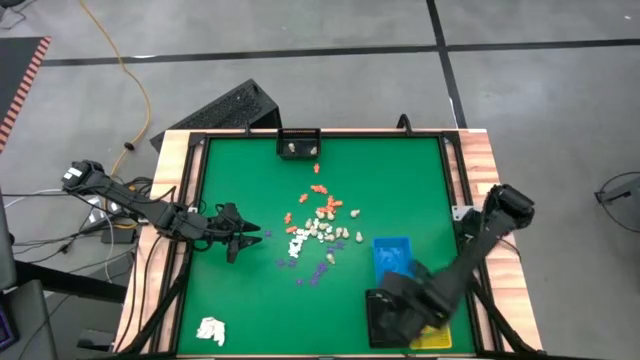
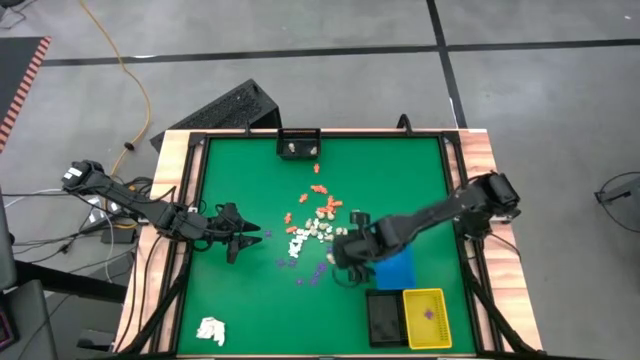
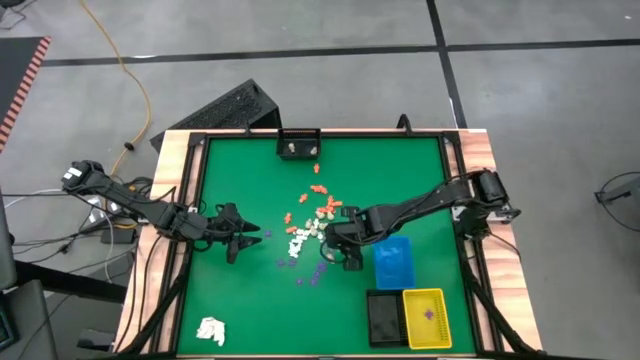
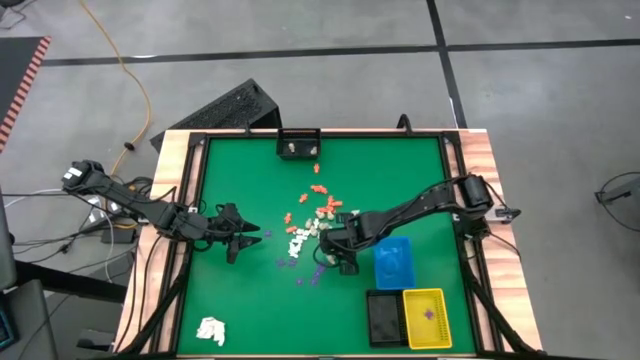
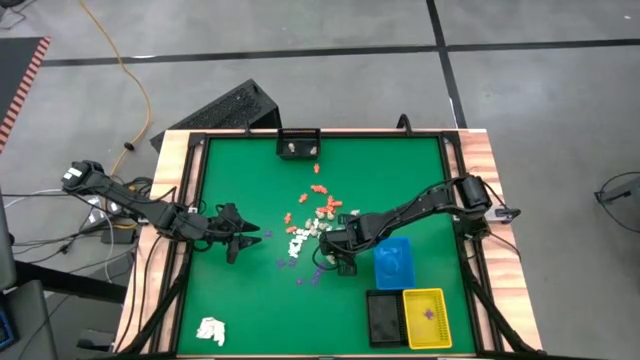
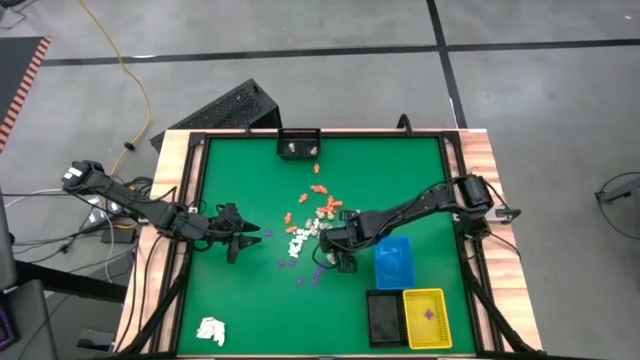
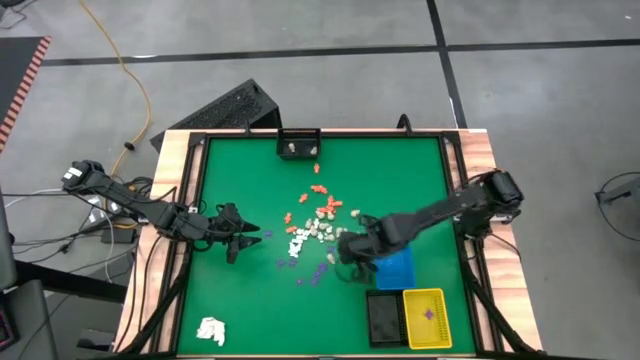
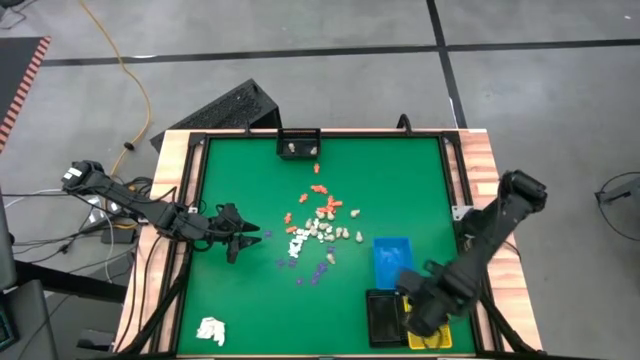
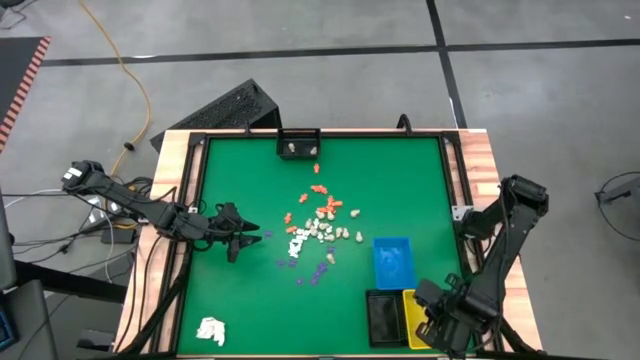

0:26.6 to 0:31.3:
Task: Sort Halloween decoration
Put the purple spider toy into the yellow bin

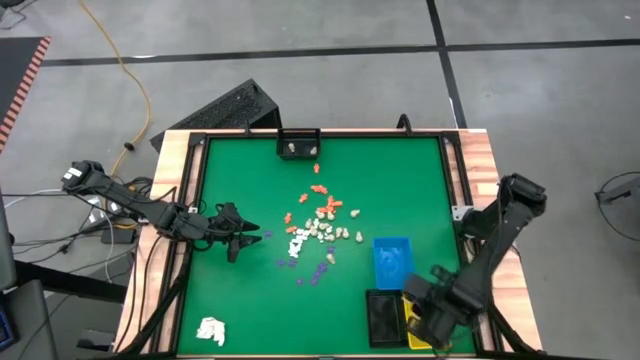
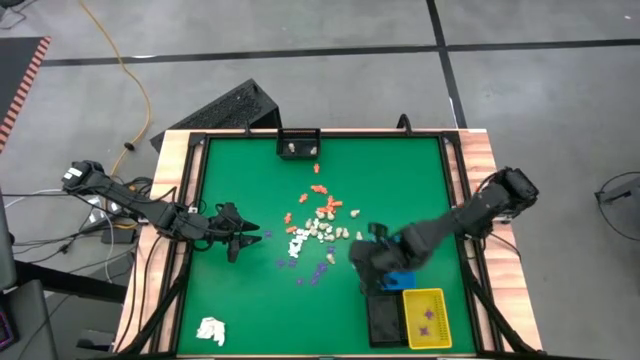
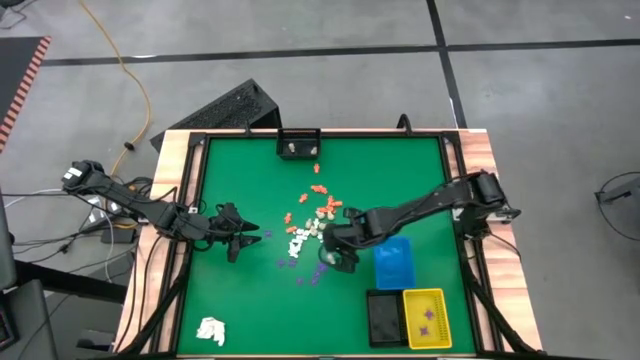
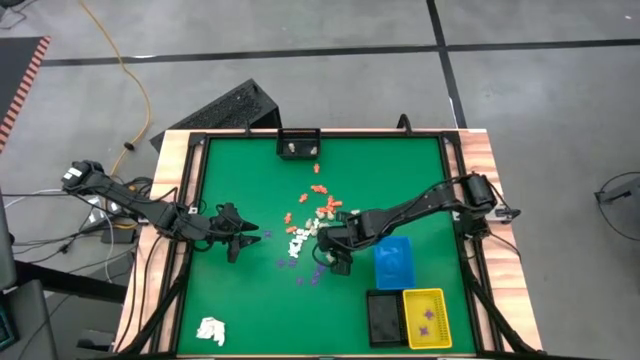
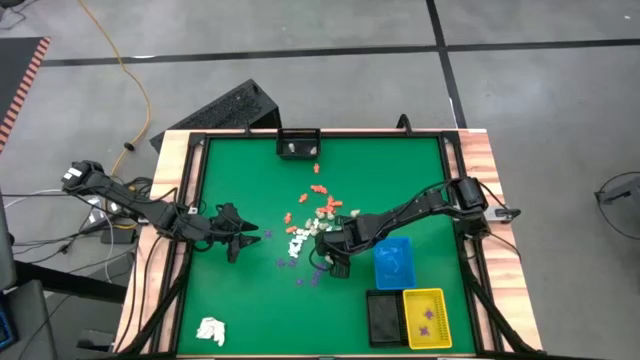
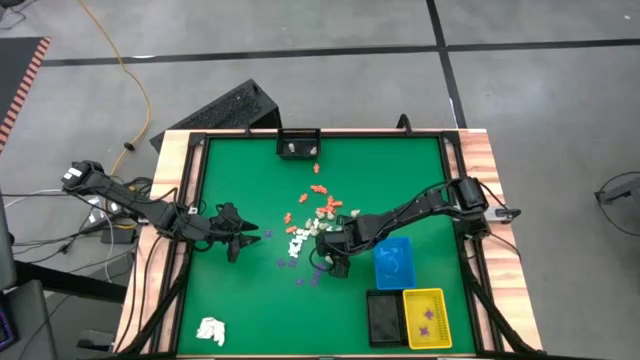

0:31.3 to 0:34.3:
Put the purple spider toy into the yellow bin

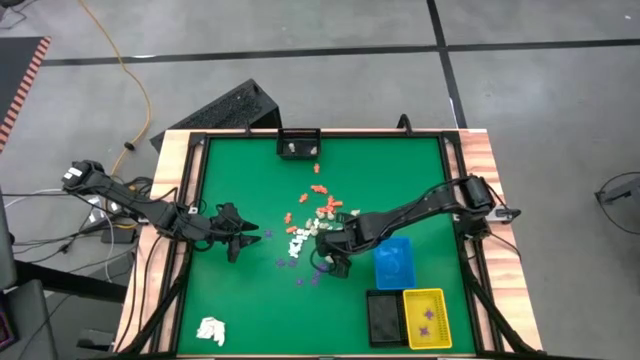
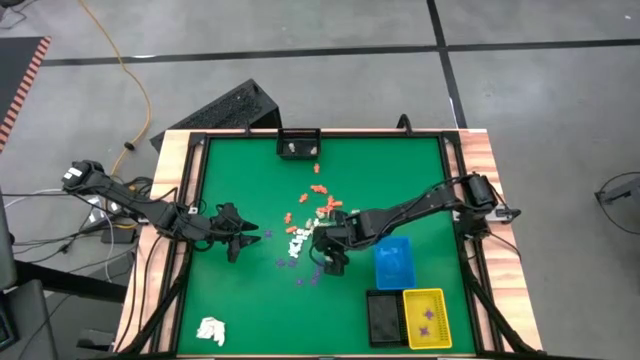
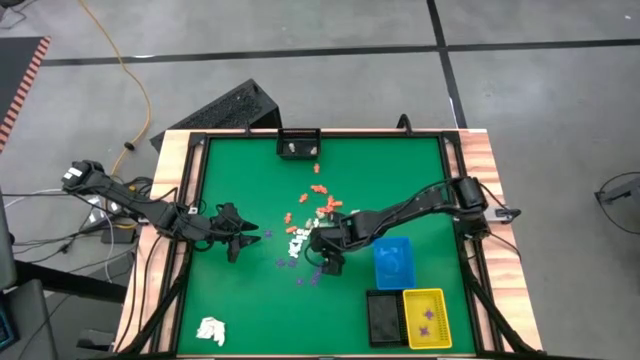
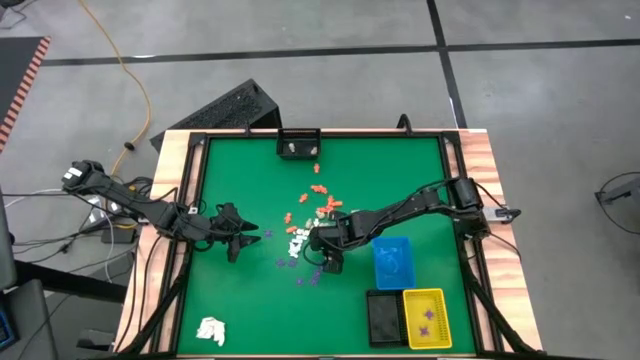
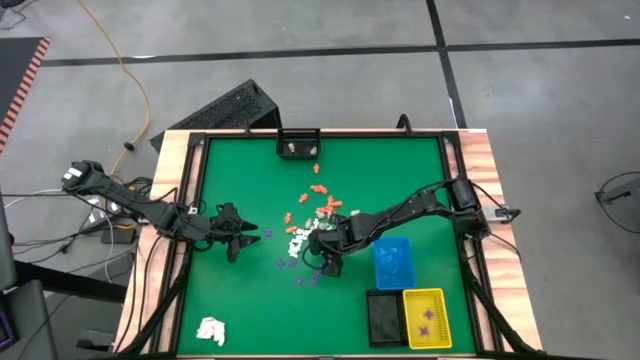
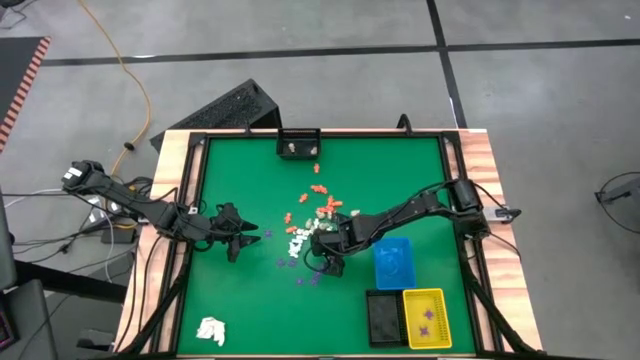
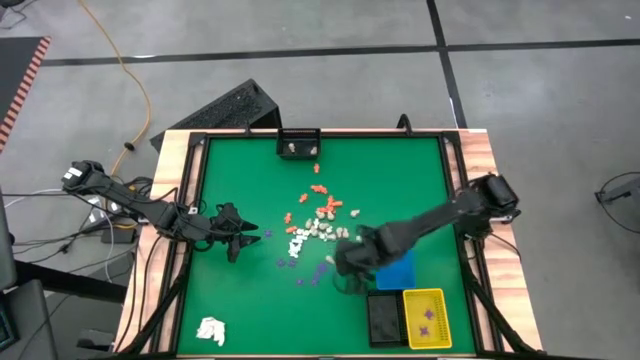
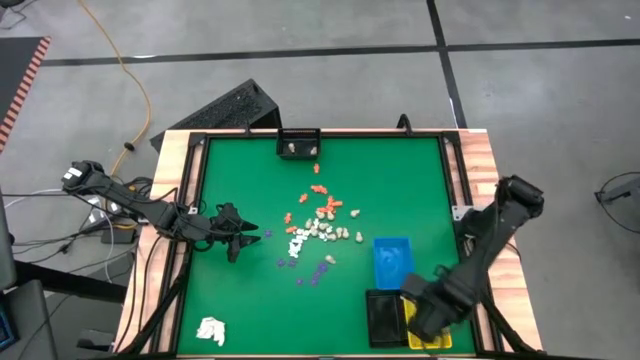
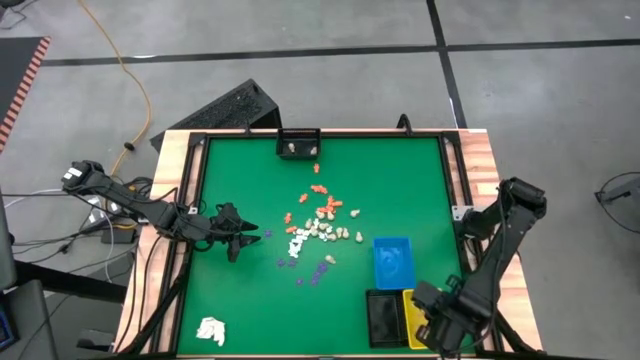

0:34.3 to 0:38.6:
Put the purple spider toy into the yellow bin

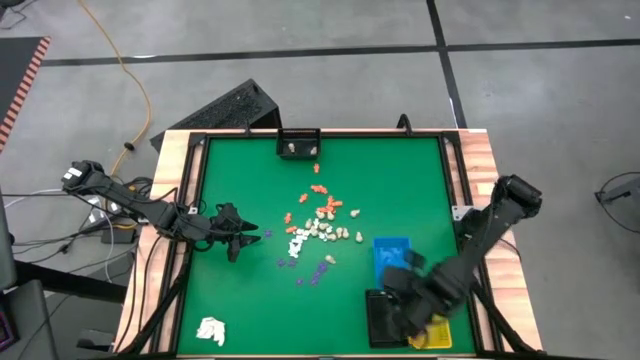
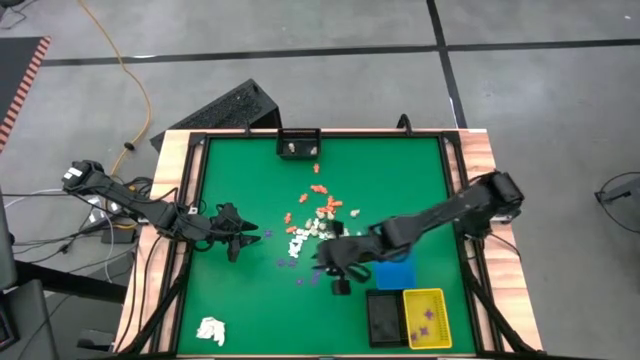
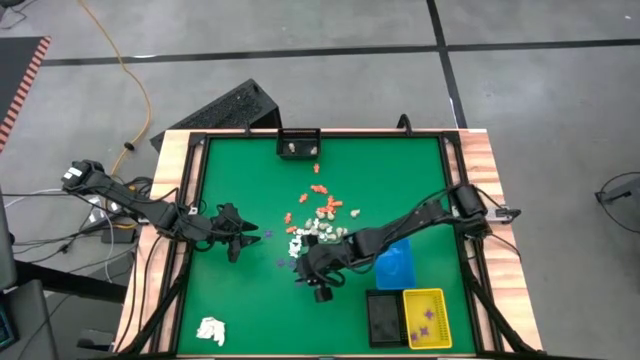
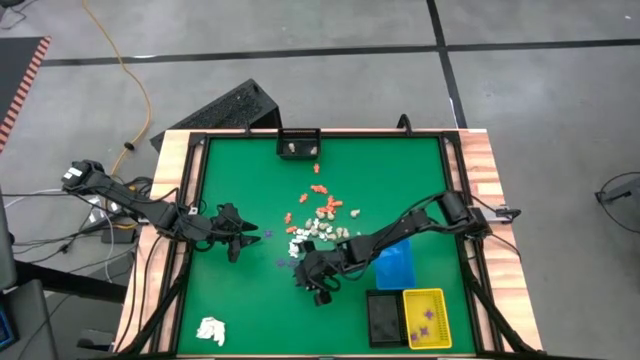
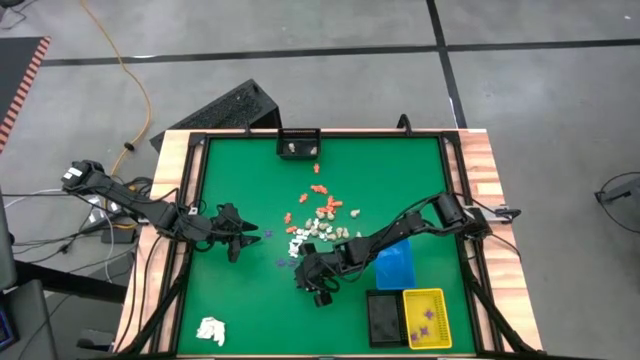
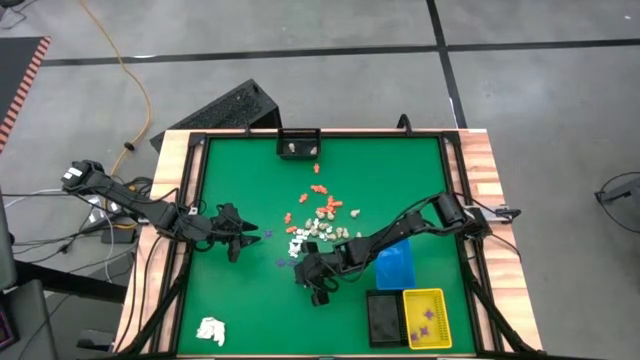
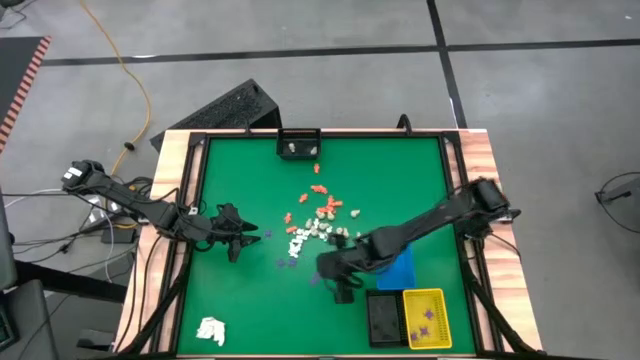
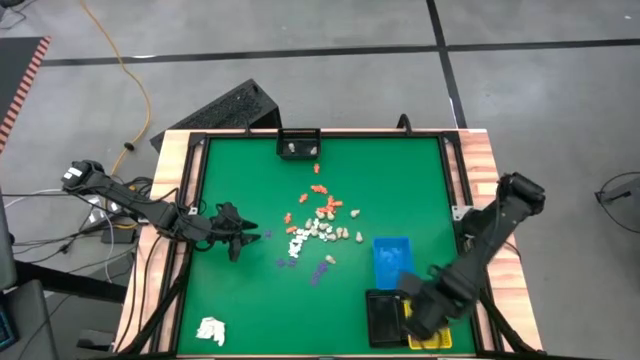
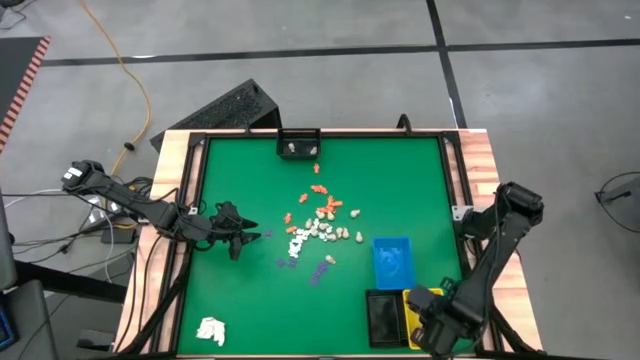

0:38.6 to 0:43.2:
Put the purple spider toy into the yellow bin

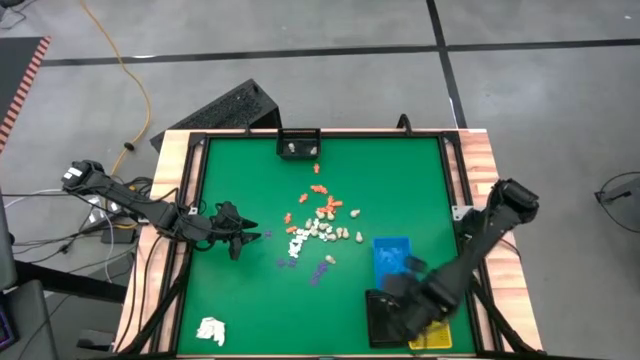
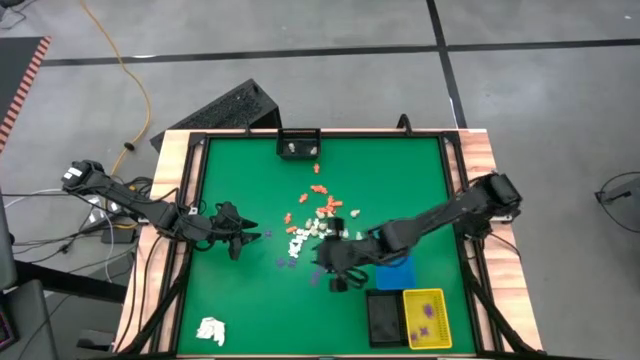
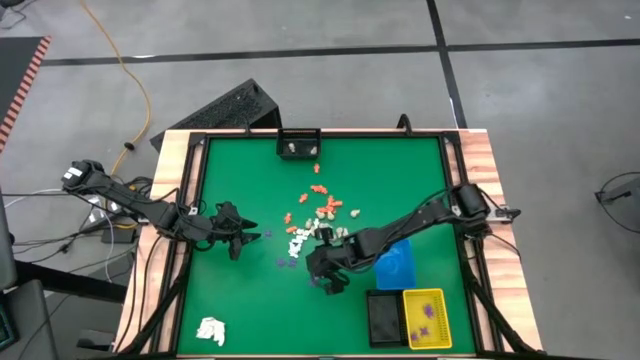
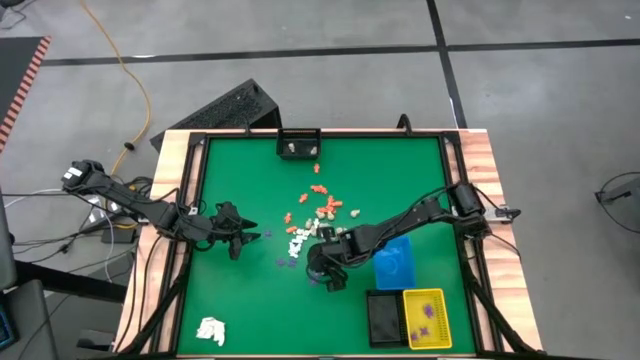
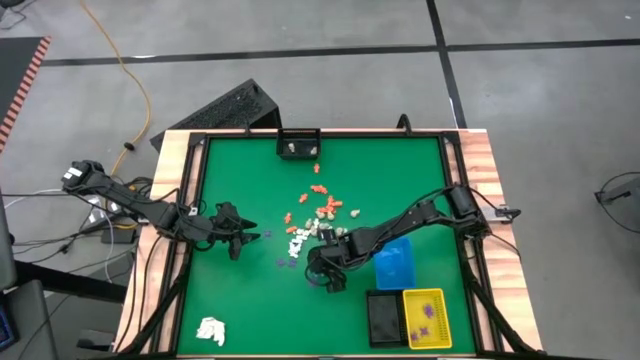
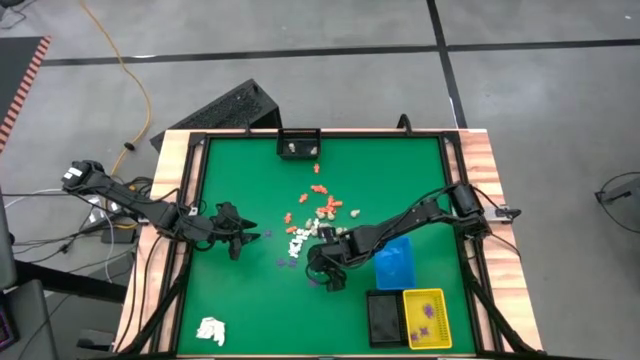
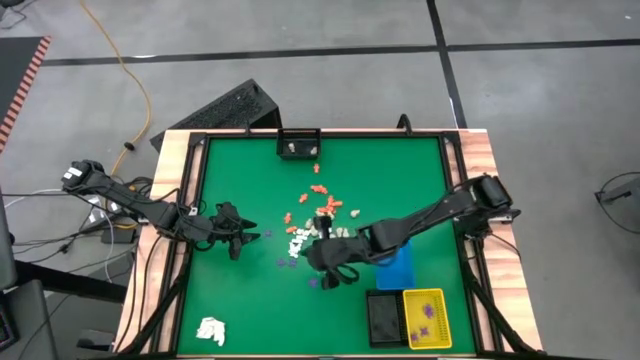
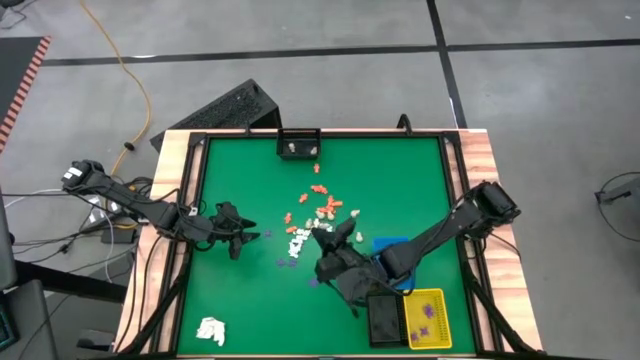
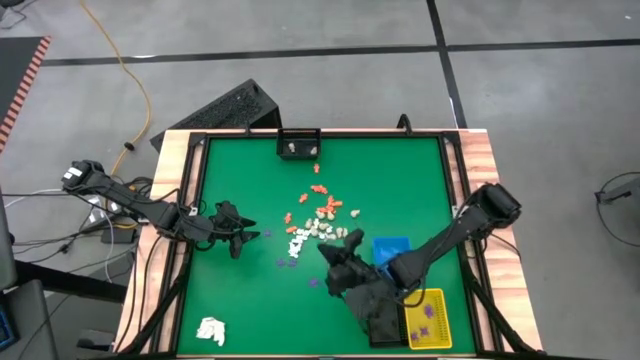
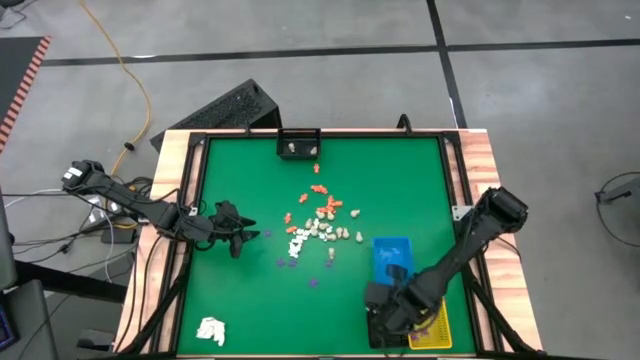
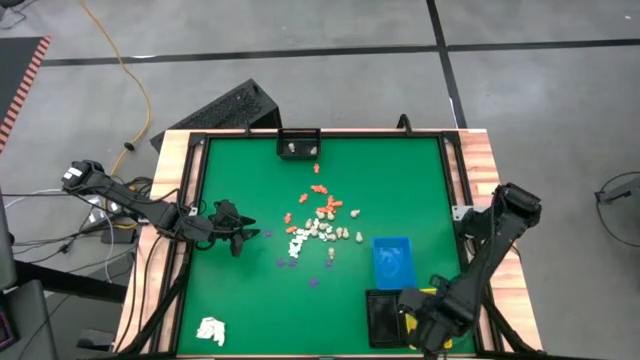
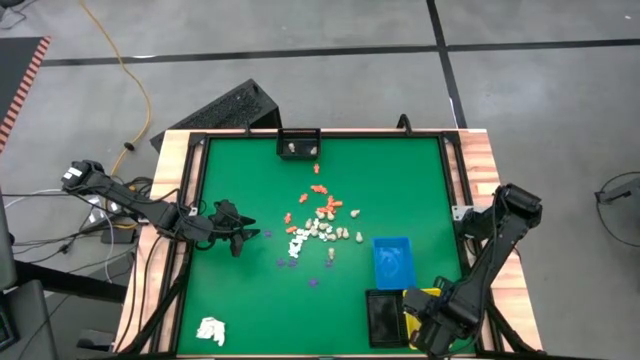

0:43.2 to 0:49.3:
Put the purple spider toy into the yellow bin
